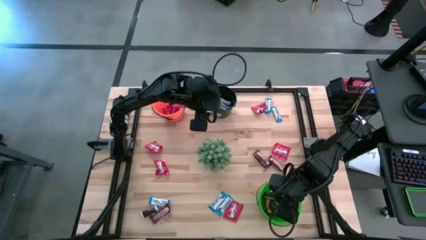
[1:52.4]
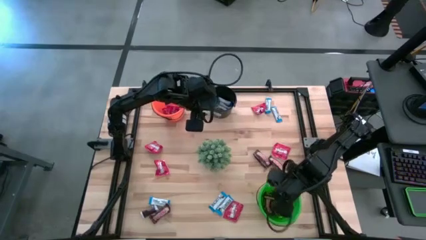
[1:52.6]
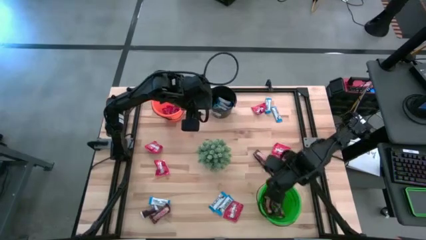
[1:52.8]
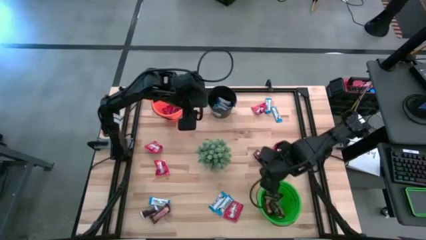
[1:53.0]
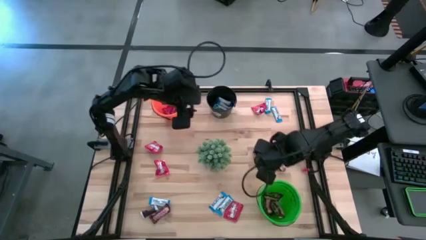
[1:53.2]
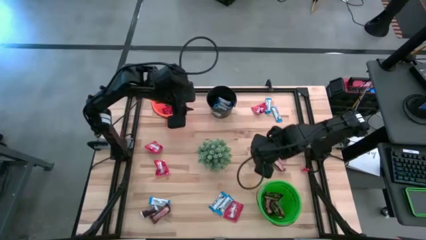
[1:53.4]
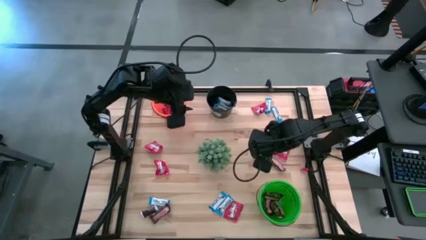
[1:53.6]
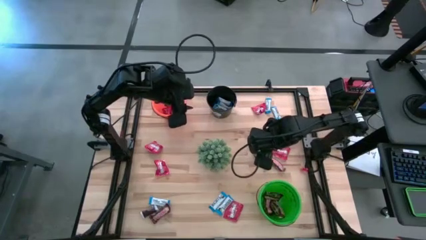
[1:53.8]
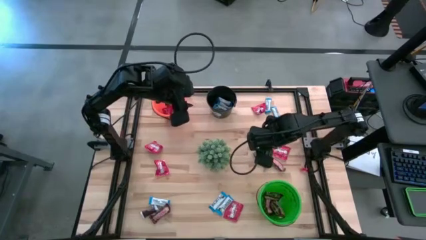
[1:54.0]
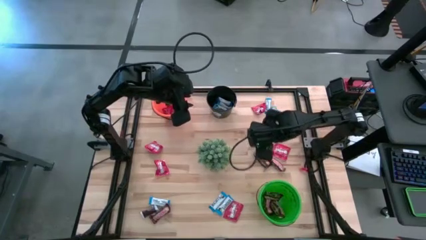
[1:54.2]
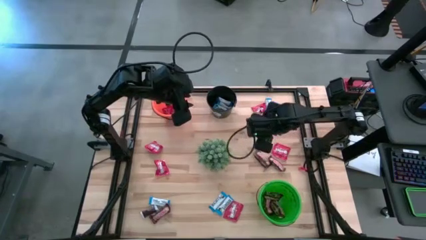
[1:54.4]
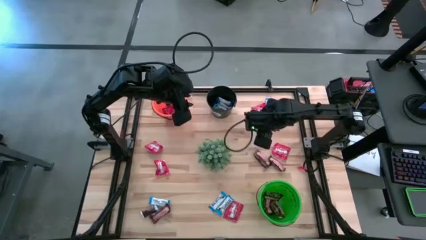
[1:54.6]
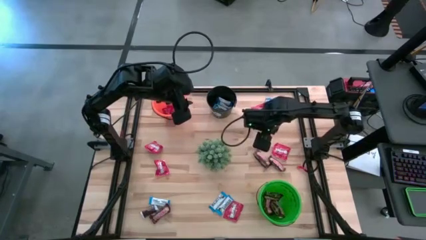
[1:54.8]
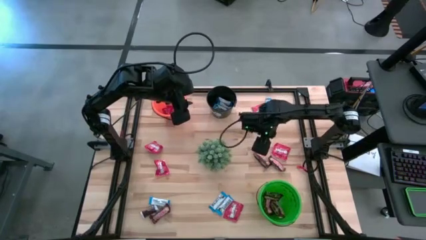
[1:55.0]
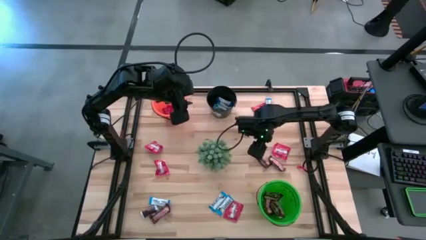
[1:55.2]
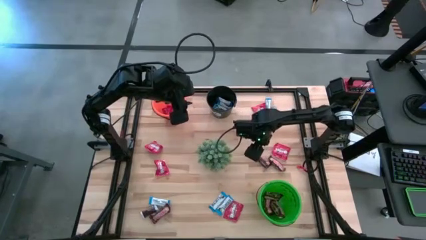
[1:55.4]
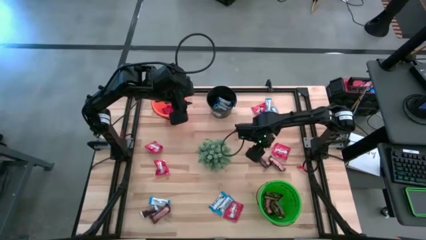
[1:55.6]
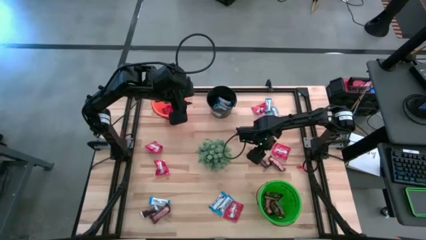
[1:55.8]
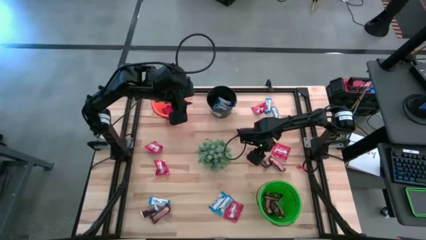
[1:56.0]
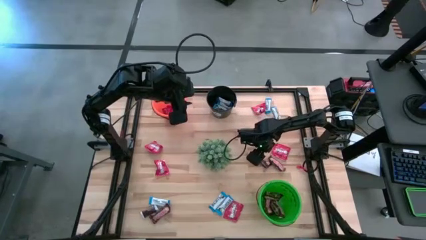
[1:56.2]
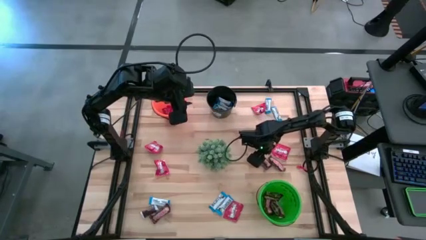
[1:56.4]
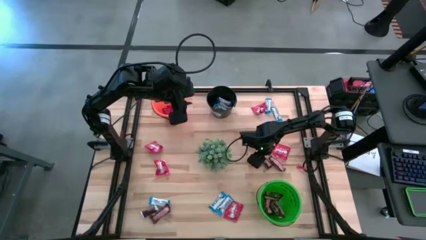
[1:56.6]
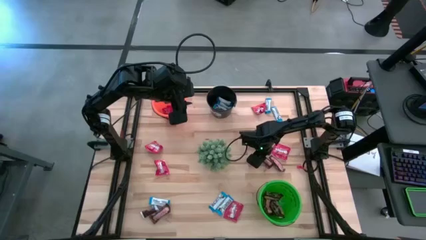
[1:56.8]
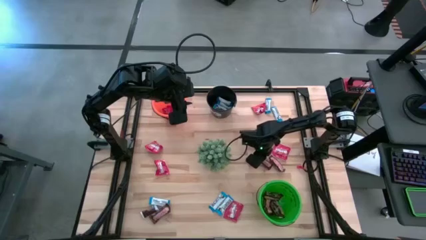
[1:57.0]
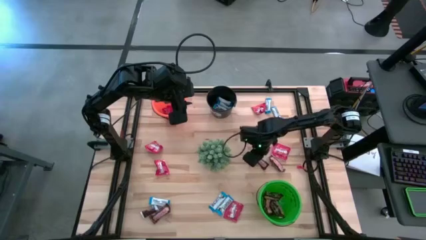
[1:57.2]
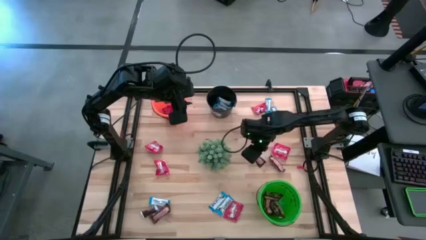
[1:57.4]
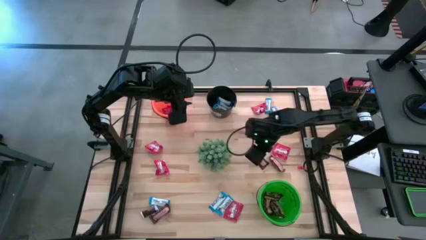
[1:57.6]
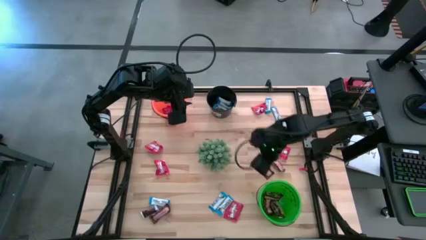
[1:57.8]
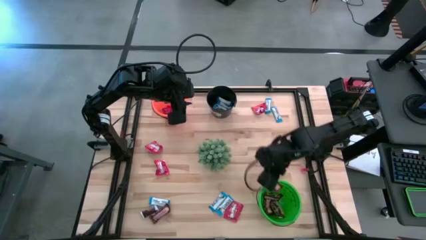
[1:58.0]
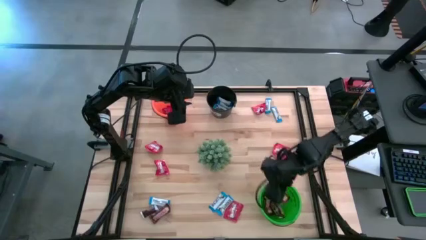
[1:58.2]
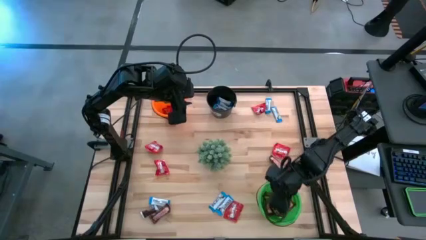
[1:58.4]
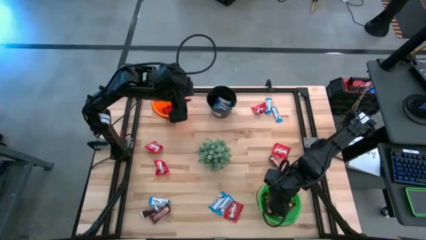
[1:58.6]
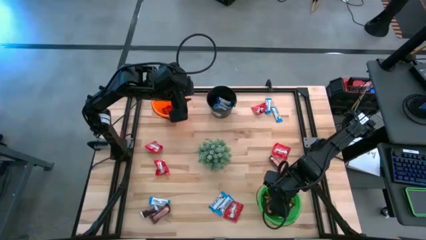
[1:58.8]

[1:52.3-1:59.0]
Task: Organize candy in baskets
Put the brown chocolate bar into the green bucket

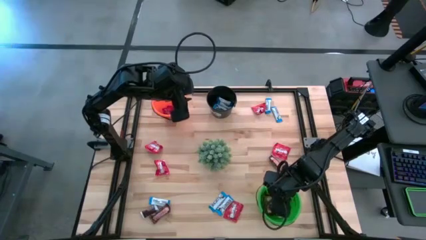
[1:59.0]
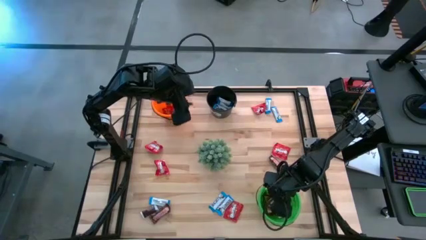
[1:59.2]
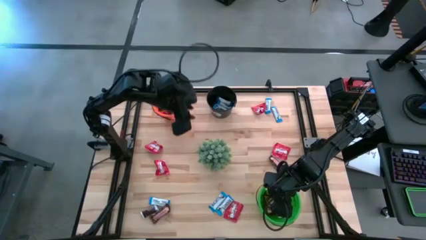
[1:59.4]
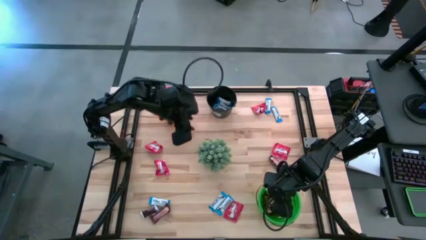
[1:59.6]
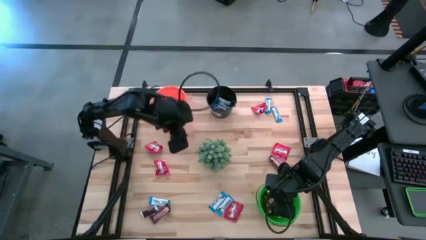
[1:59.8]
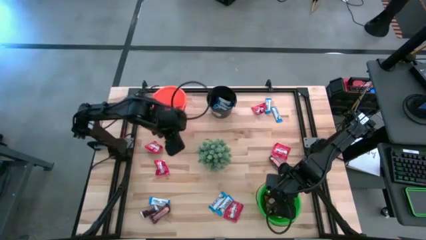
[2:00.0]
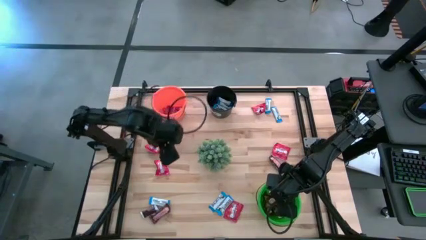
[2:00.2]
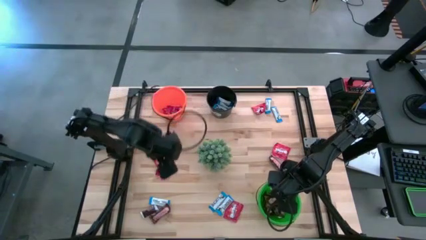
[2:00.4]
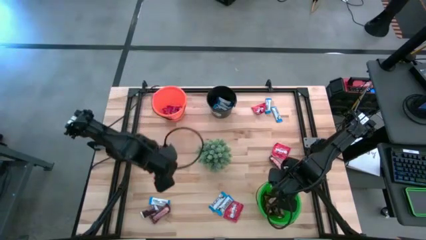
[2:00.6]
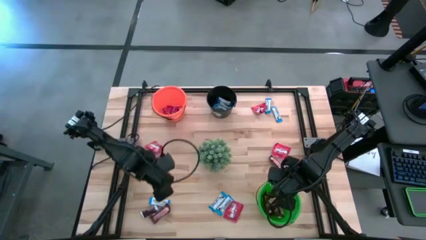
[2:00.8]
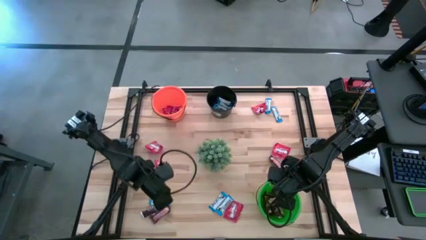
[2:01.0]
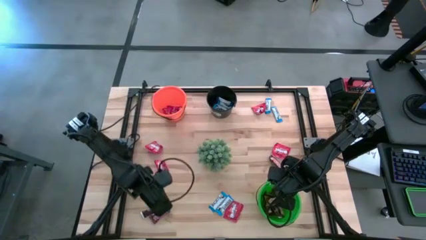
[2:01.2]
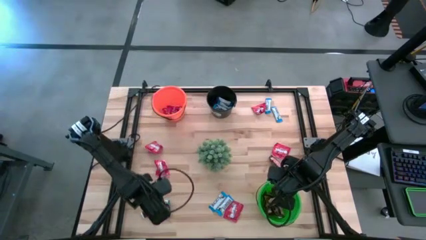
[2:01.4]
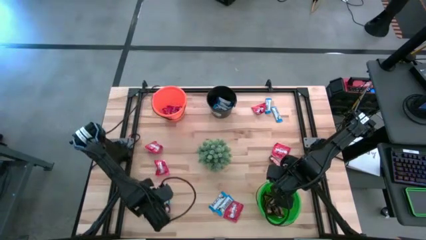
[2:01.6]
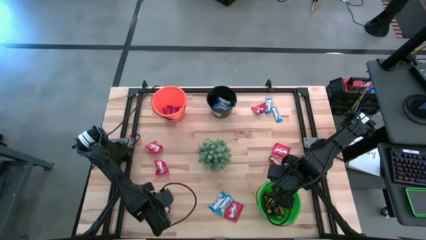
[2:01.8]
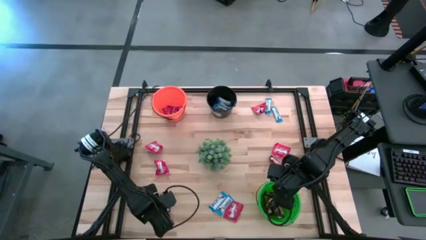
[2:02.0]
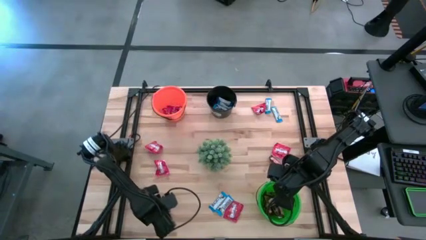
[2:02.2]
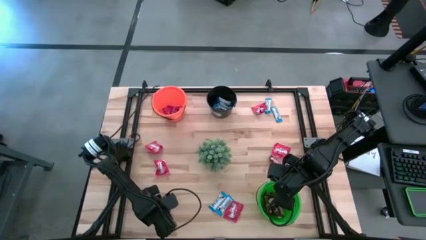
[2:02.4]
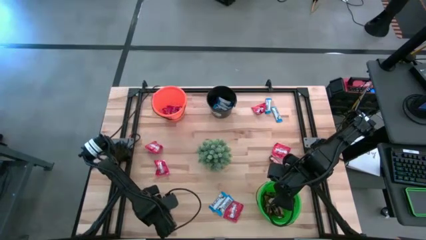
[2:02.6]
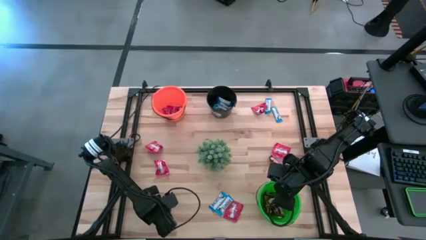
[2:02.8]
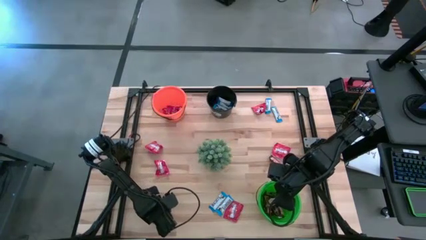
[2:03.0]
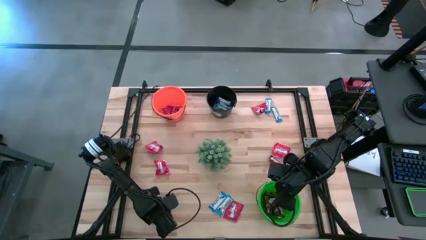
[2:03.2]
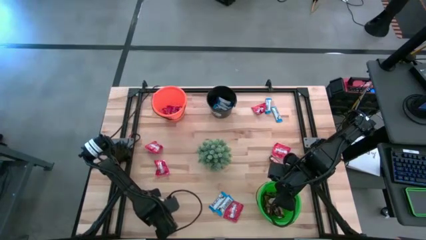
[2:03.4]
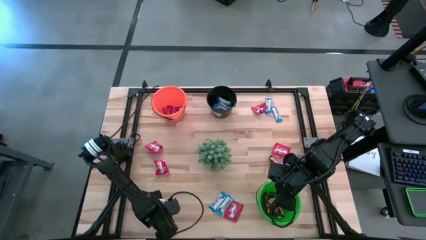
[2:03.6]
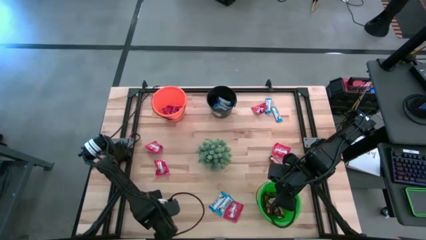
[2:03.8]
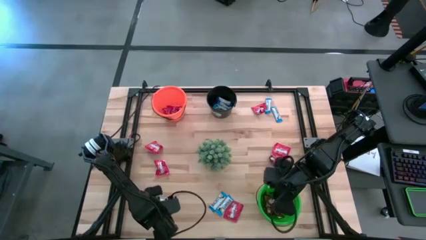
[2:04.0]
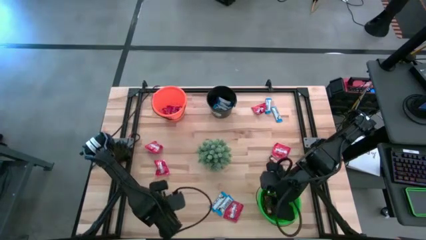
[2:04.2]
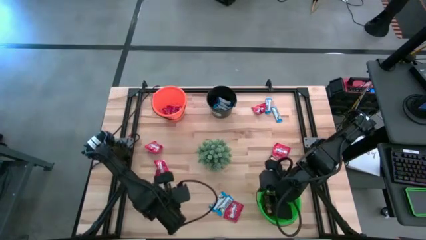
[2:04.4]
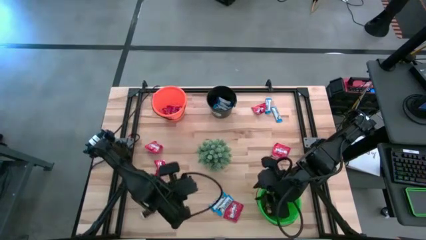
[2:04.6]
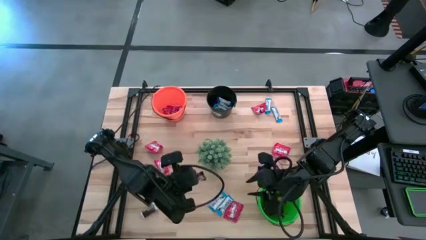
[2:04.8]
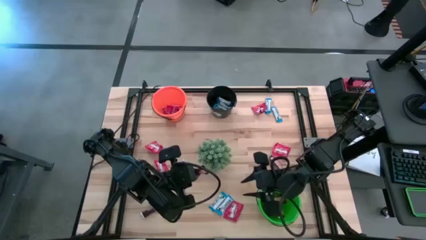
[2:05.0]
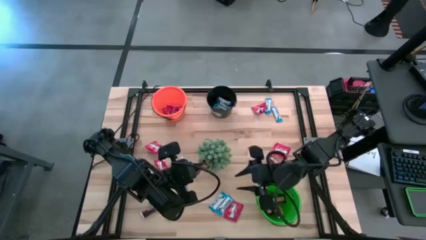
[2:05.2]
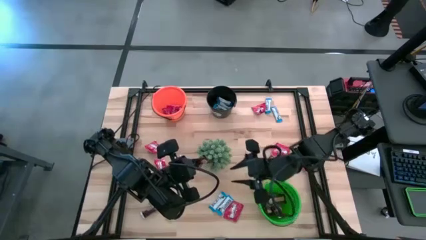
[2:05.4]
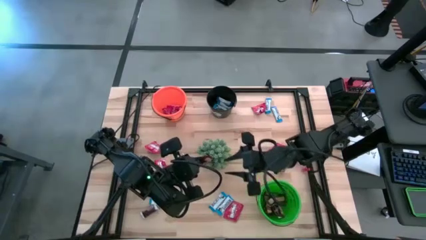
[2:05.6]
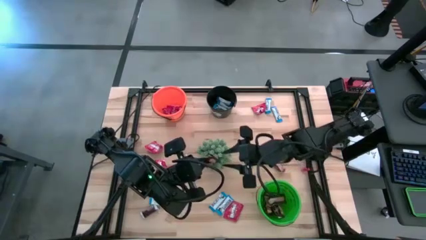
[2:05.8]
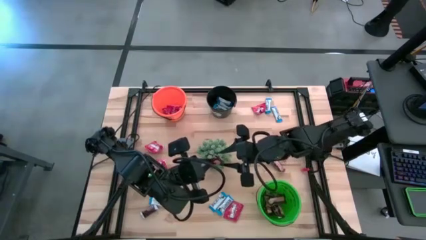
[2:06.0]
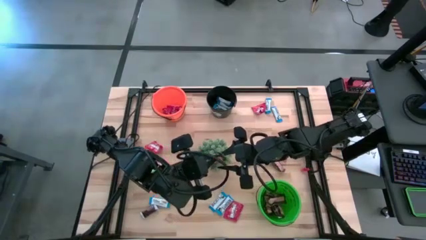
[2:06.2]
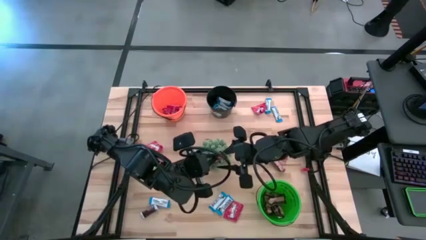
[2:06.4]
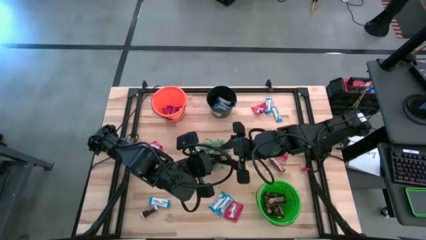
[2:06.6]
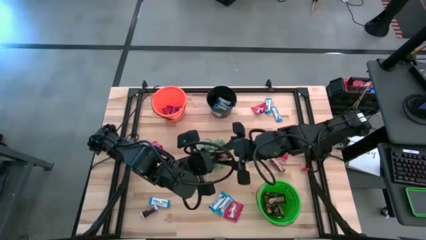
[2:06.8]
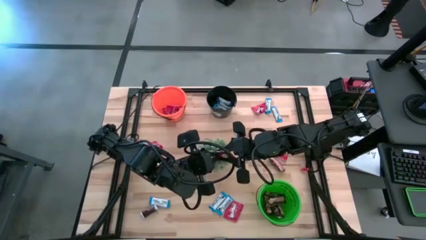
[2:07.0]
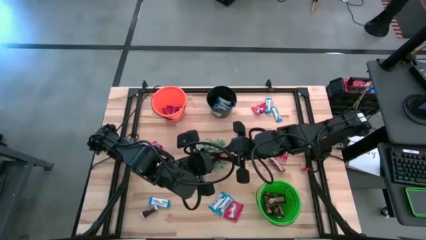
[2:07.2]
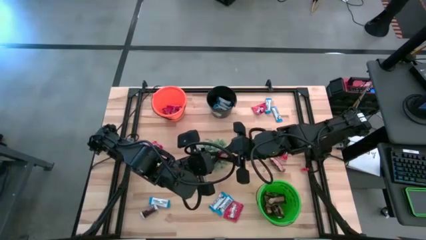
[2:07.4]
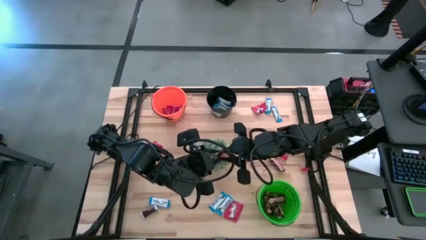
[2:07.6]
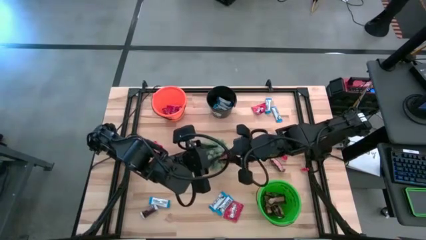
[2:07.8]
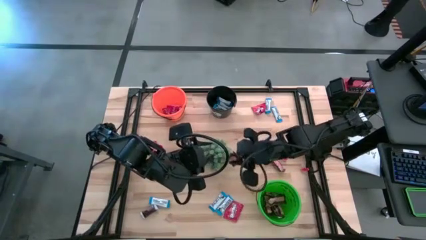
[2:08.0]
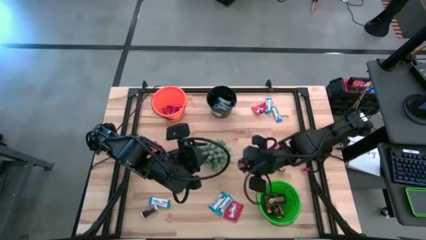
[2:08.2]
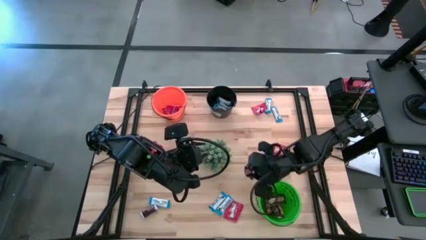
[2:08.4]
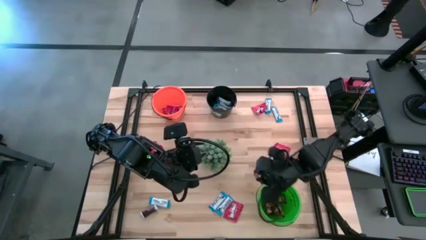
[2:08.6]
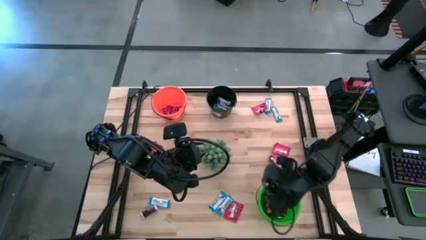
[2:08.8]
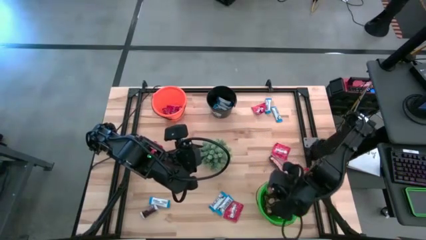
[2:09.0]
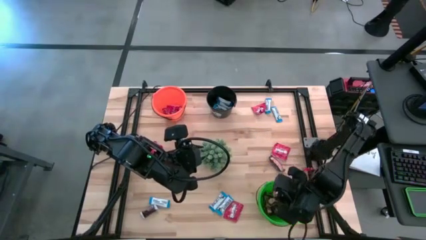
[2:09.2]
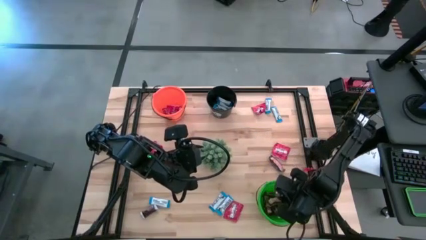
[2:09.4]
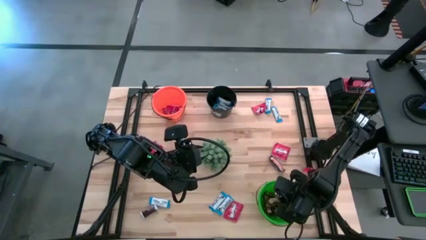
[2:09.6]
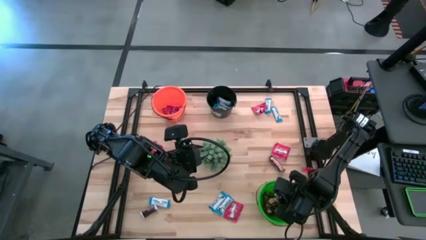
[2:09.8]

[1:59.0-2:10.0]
Put the brown chocolate bar into the green bucket
